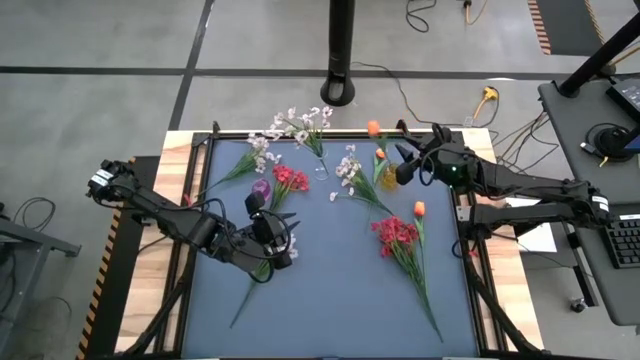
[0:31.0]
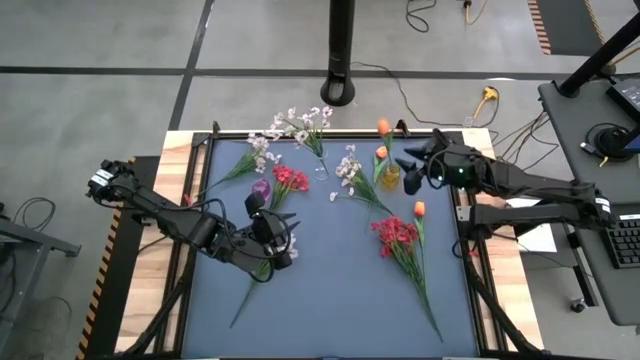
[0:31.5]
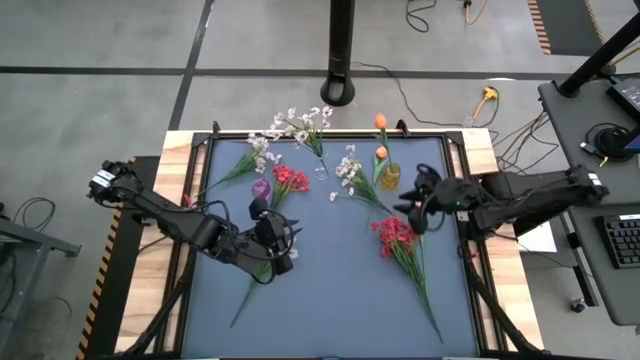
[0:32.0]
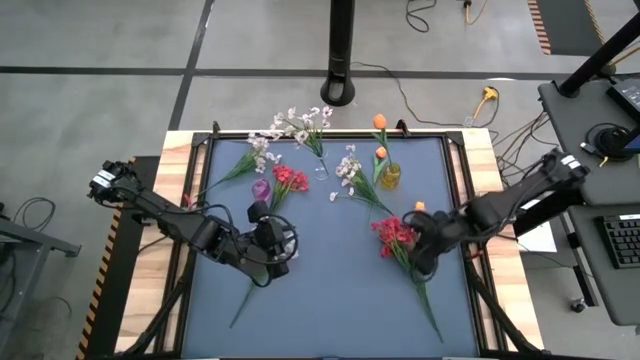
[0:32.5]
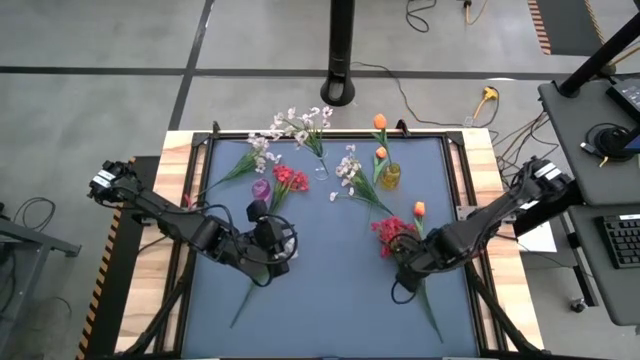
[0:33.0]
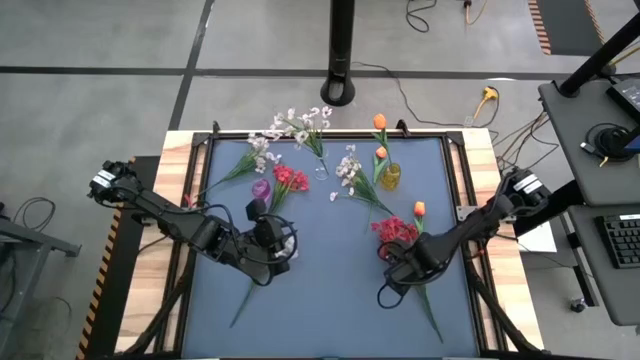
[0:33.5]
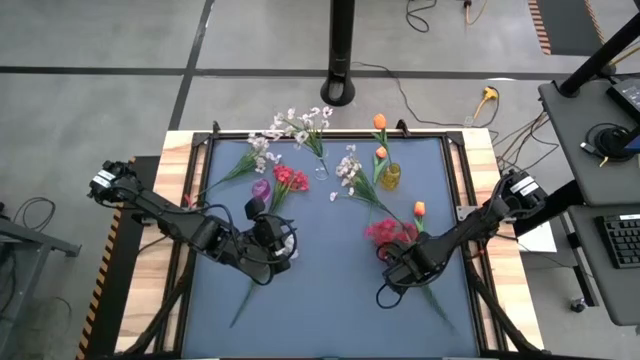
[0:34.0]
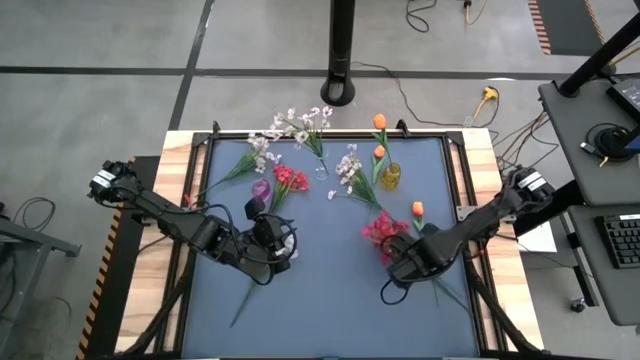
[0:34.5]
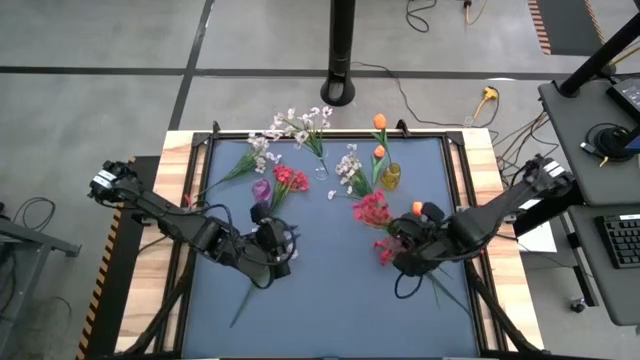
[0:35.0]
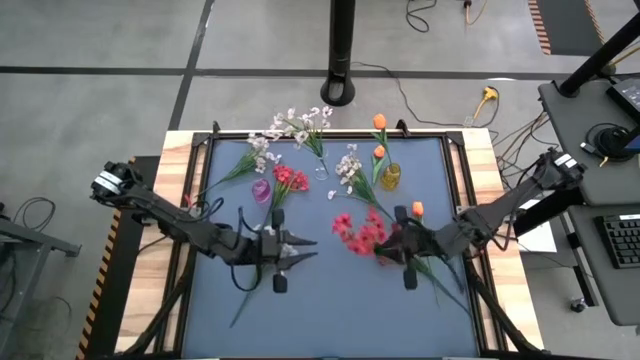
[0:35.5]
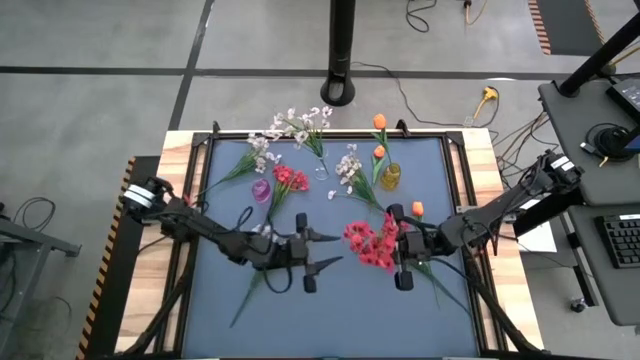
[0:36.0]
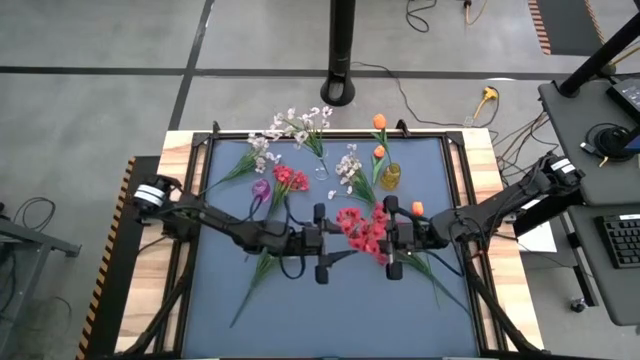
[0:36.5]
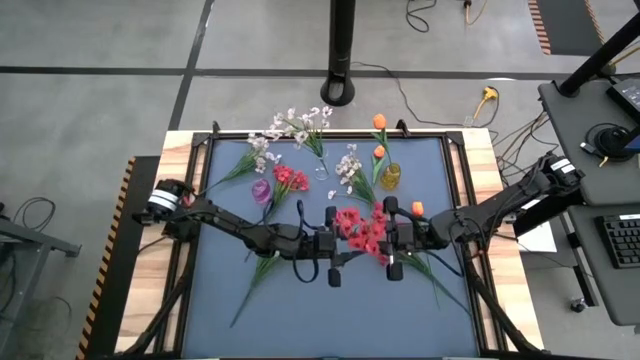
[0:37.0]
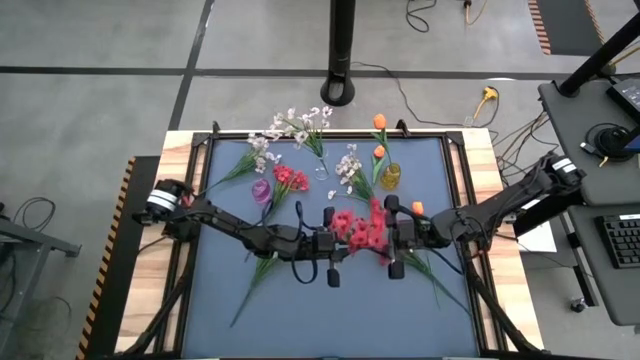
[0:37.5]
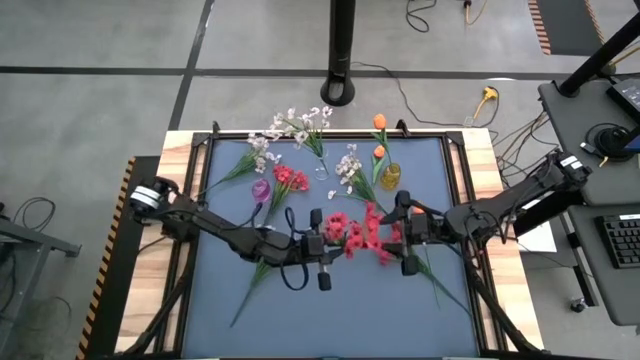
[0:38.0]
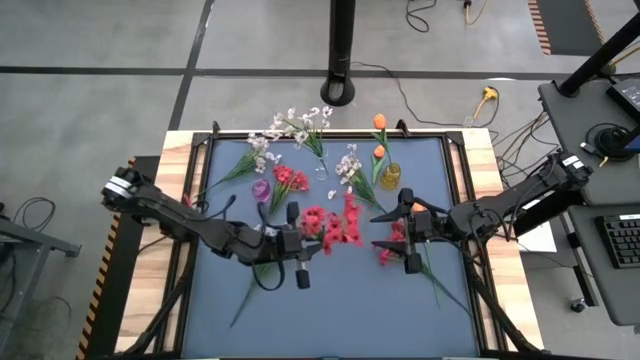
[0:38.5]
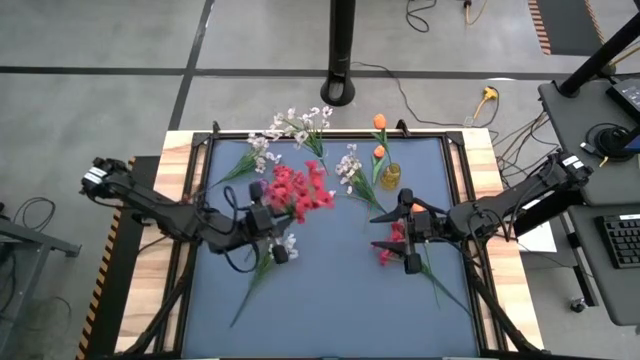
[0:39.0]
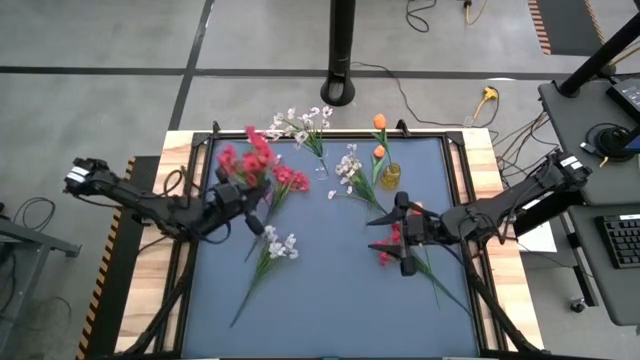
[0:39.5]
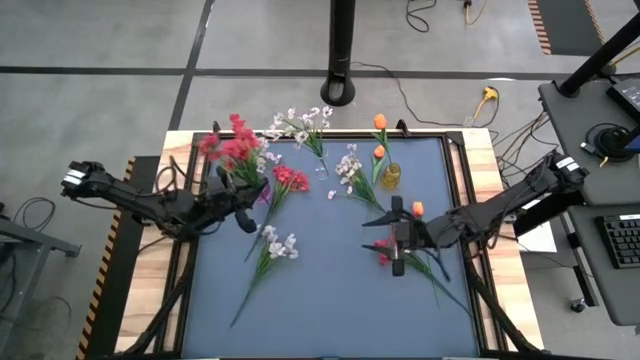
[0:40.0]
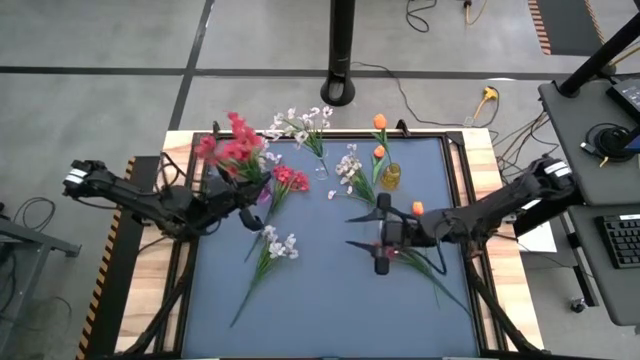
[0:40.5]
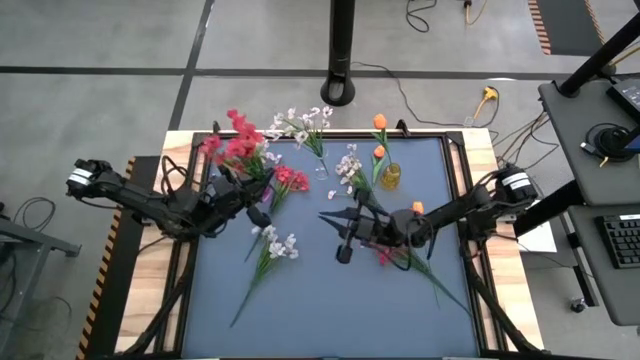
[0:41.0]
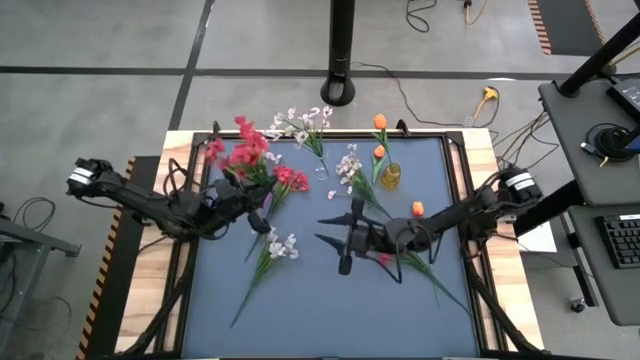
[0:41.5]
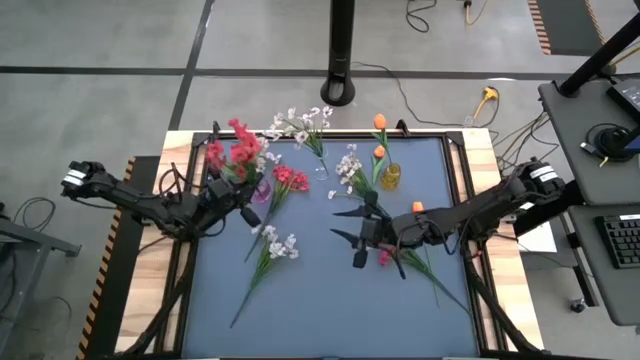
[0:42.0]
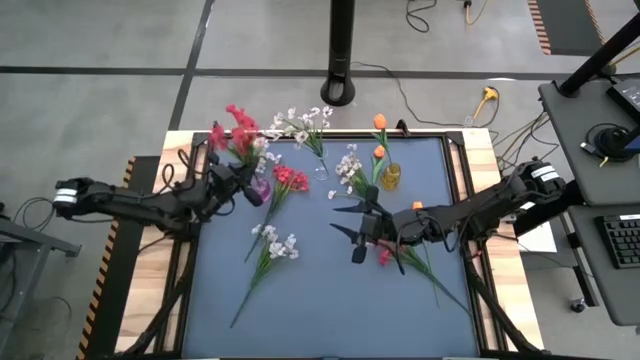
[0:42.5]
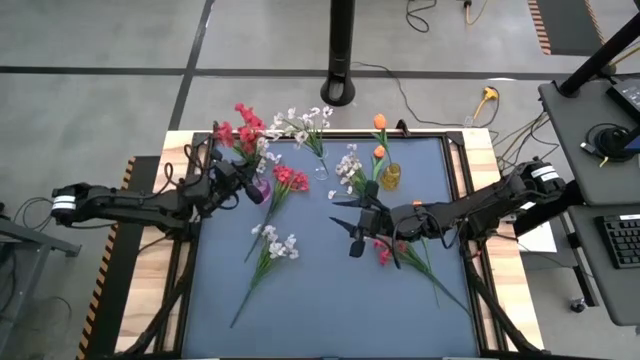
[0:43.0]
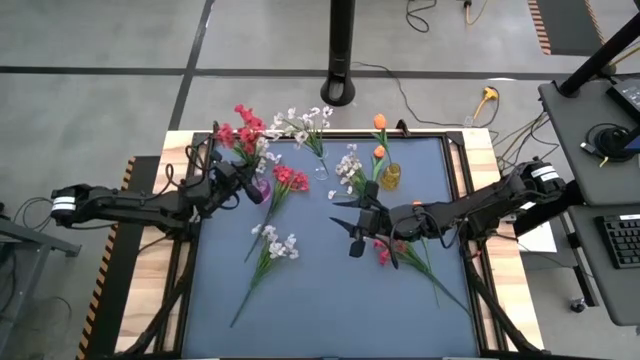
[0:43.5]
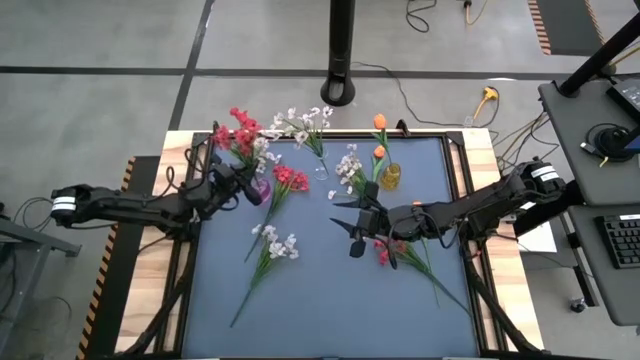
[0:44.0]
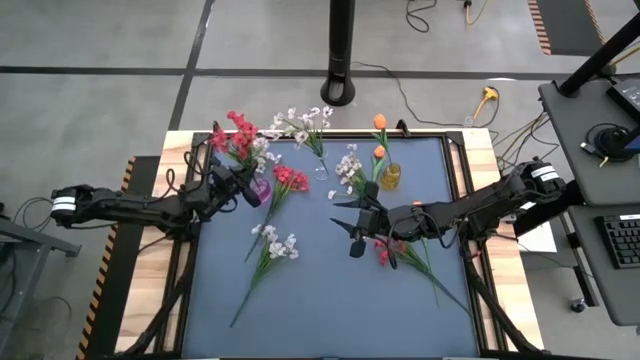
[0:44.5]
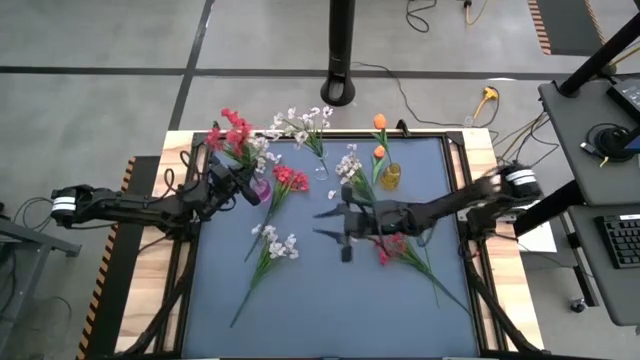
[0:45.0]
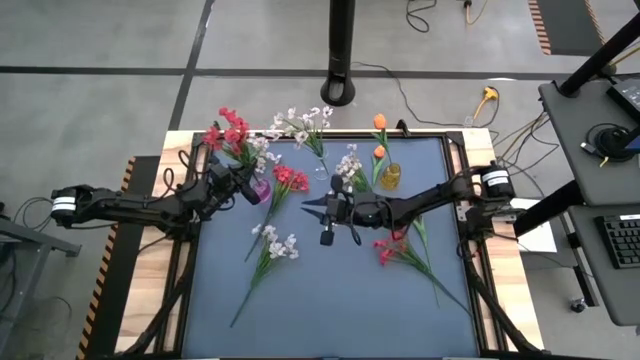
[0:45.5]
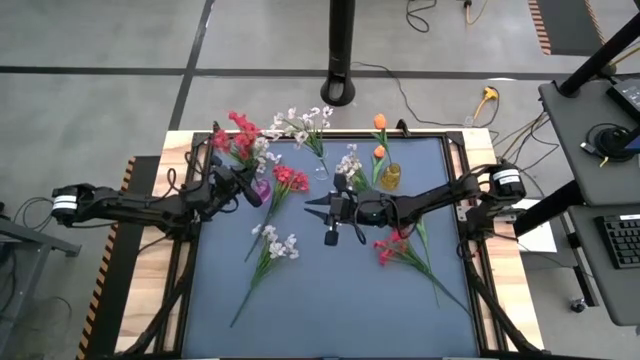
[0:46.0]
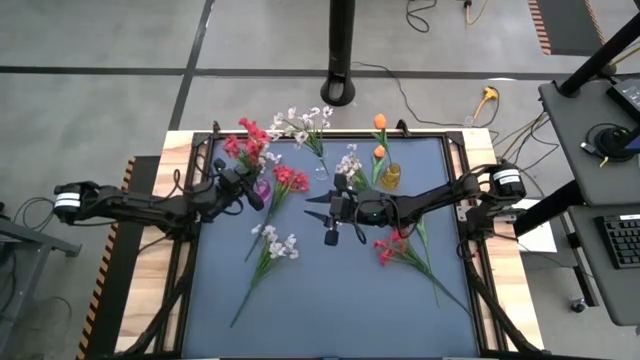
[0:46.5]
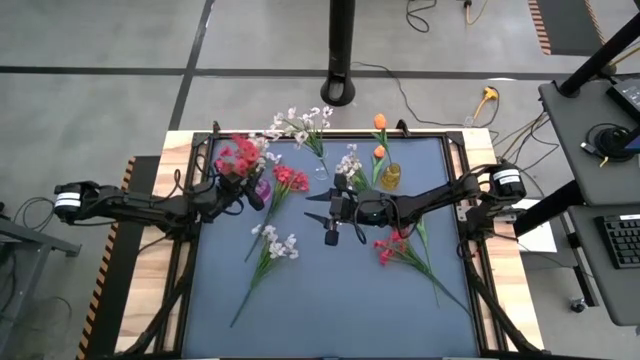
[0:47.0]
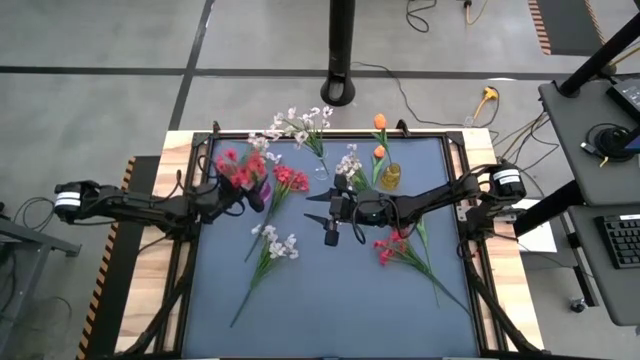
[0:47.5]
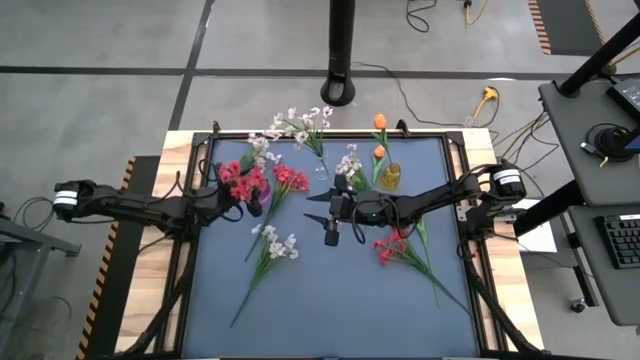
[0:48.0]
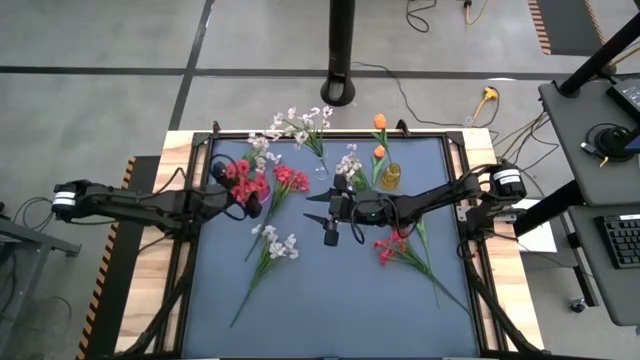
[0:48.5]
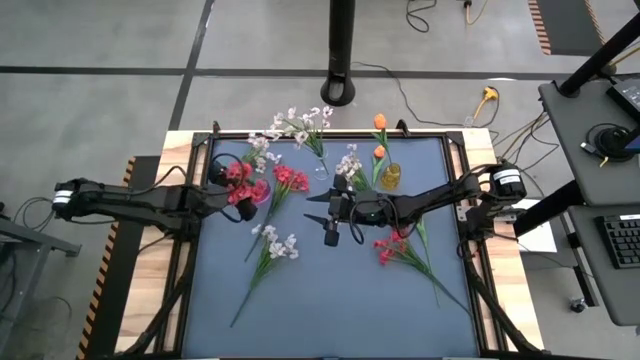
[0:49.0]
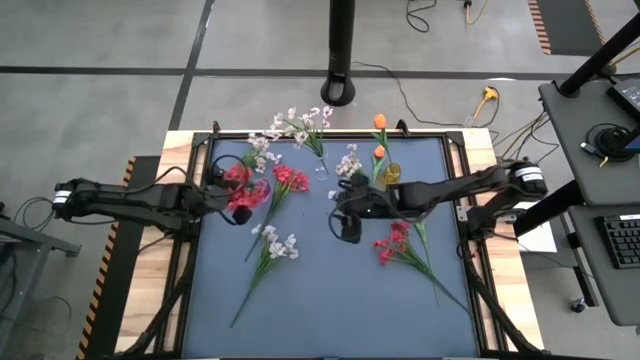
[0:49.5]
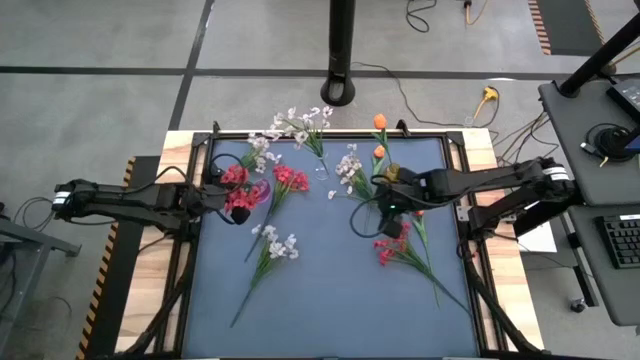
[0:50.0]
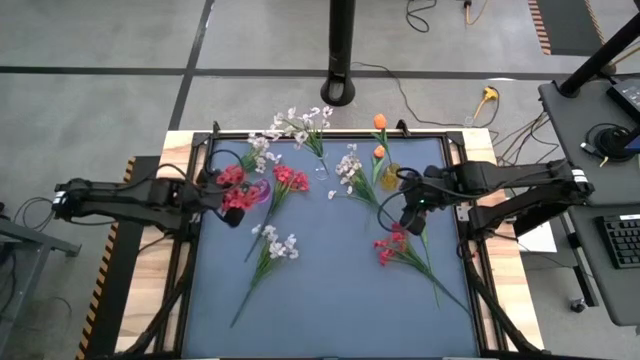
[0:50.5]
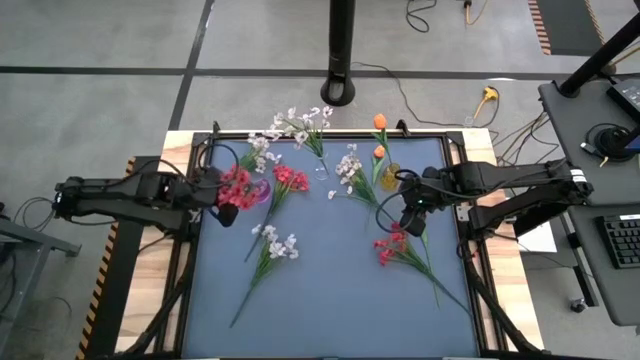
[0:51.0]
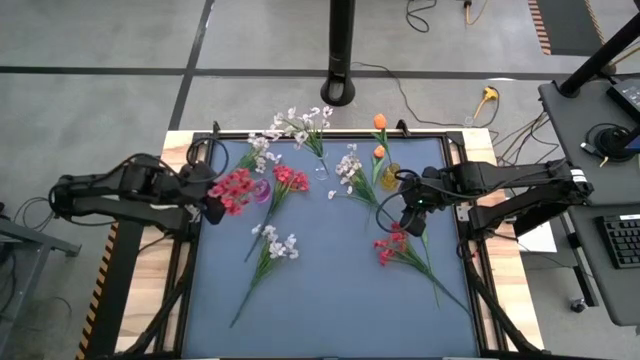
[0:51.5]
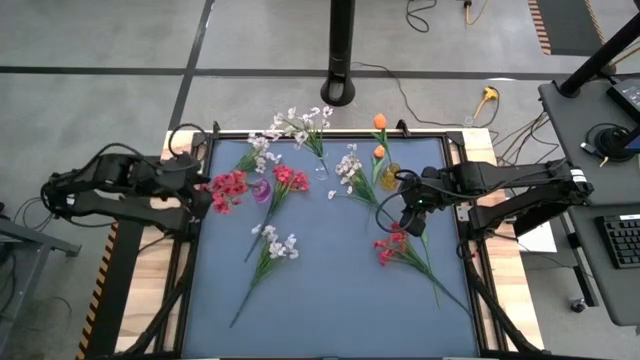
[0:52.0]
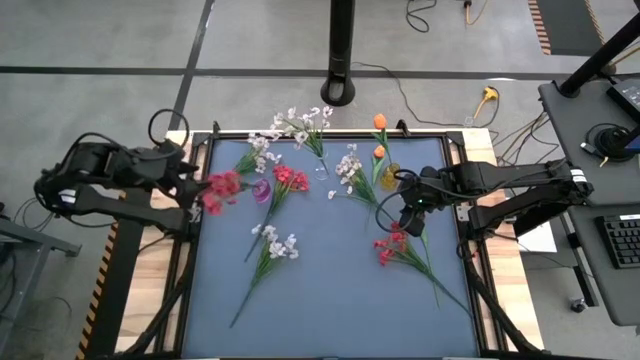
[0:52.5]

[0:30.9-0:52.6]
Task: Sort flowers into vase by color
Put the red flower into the purple vase
